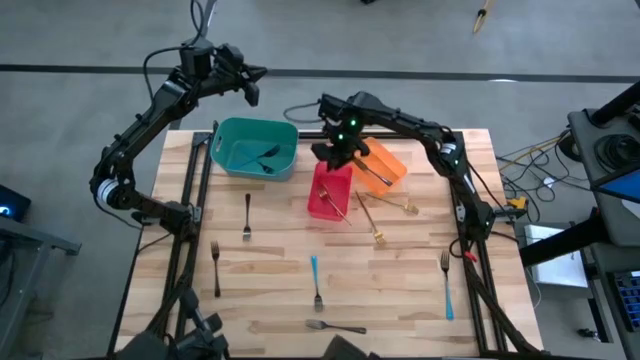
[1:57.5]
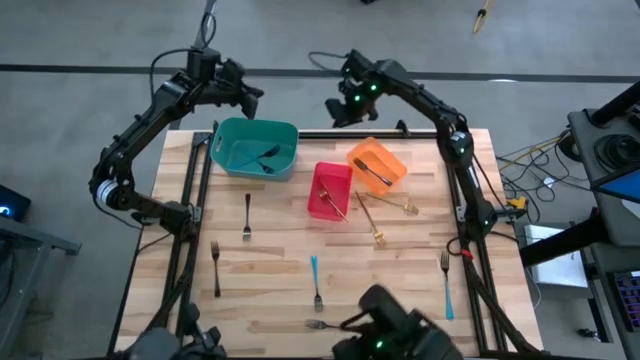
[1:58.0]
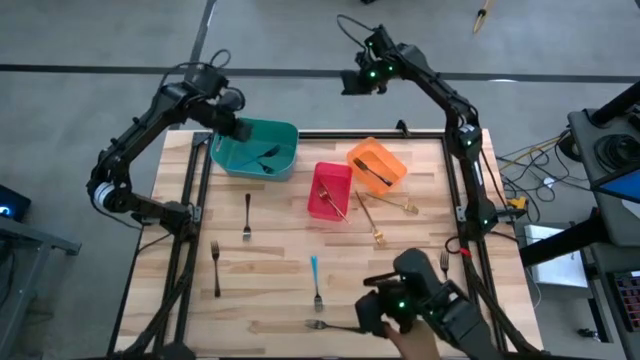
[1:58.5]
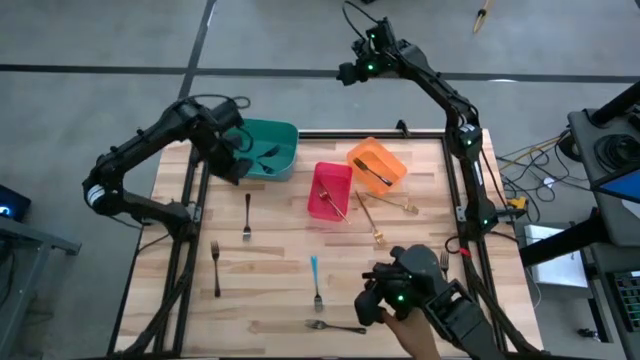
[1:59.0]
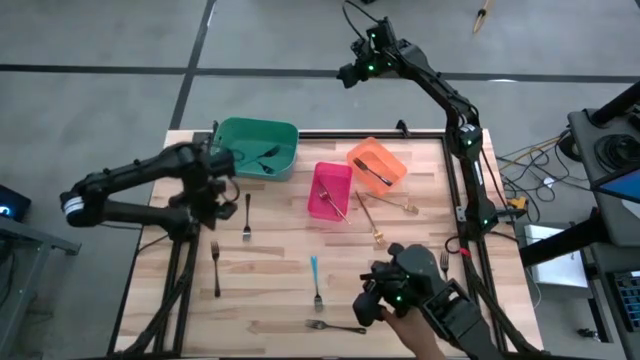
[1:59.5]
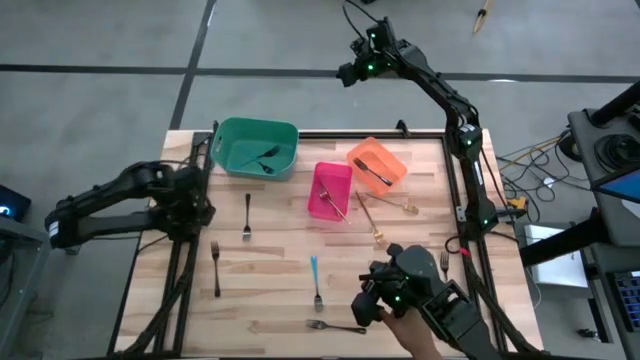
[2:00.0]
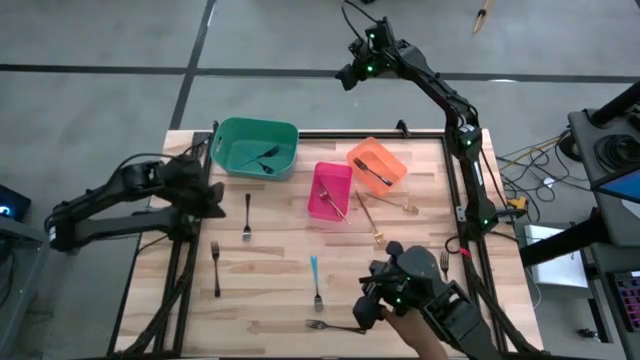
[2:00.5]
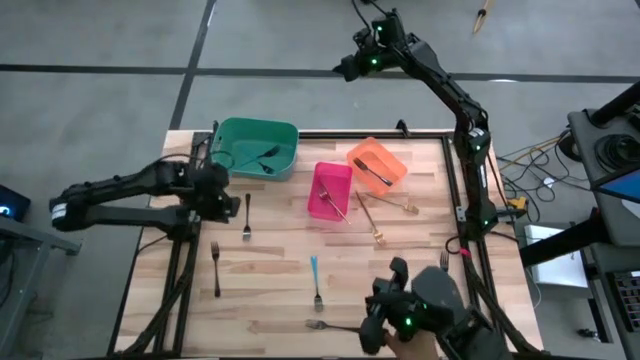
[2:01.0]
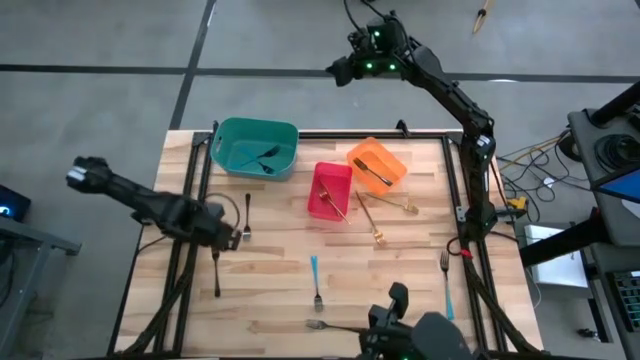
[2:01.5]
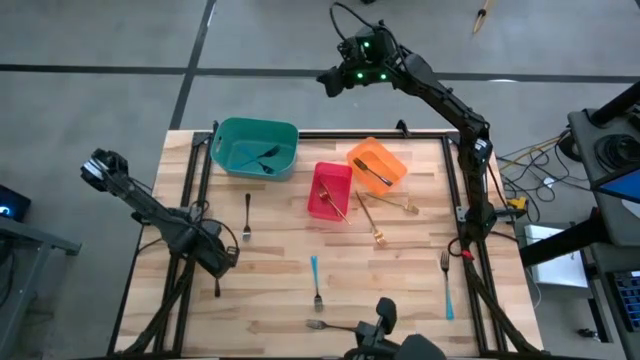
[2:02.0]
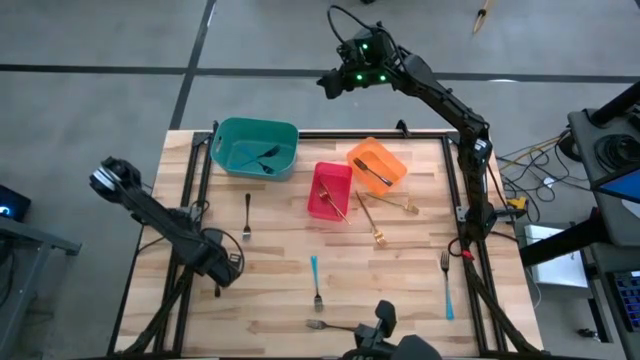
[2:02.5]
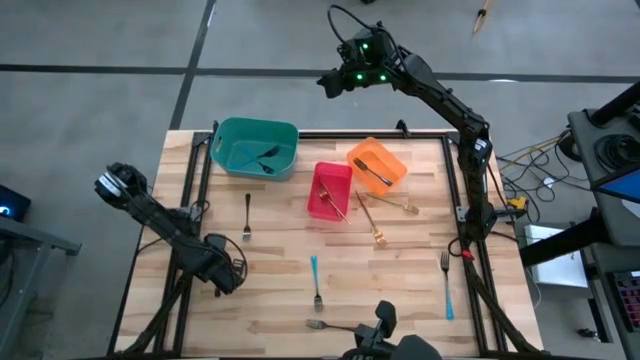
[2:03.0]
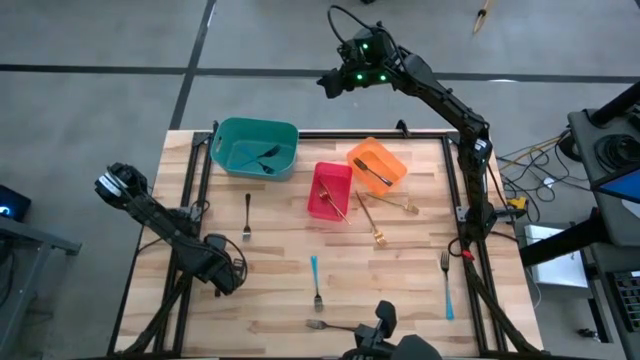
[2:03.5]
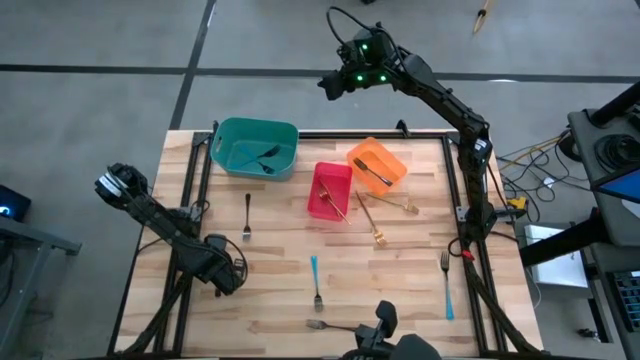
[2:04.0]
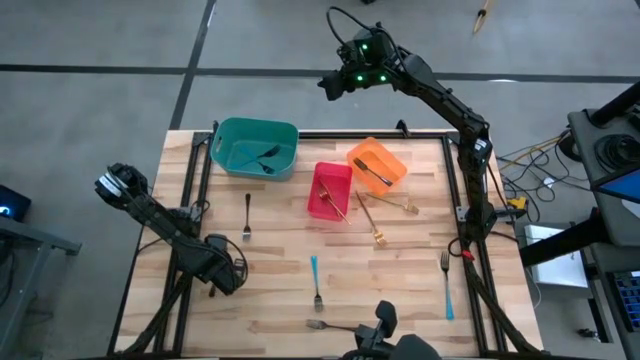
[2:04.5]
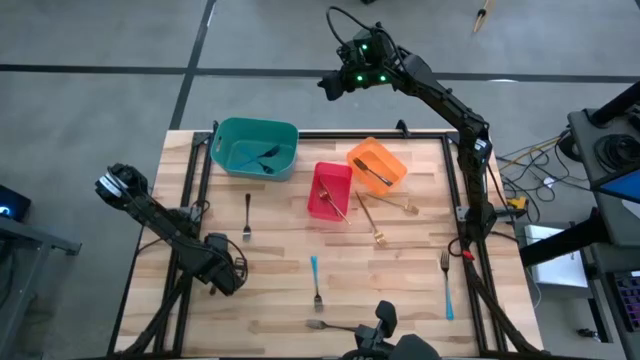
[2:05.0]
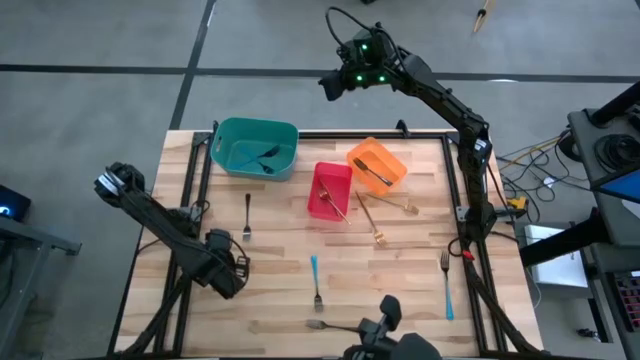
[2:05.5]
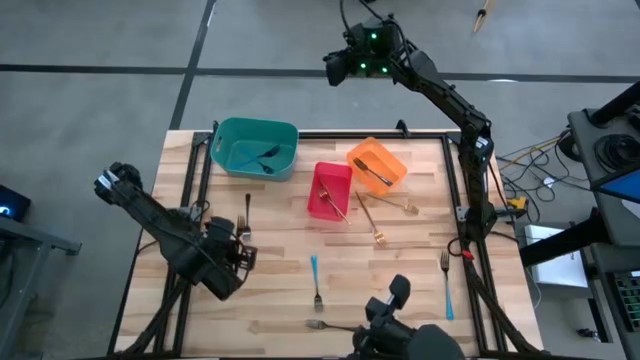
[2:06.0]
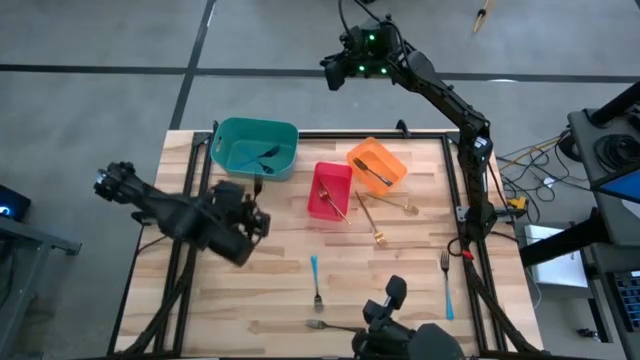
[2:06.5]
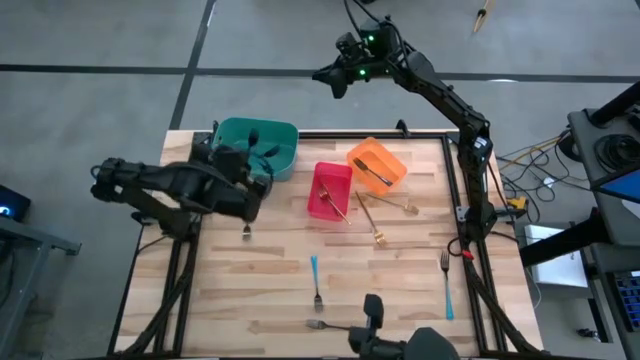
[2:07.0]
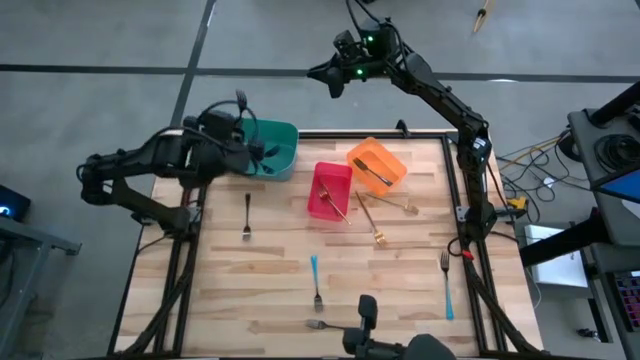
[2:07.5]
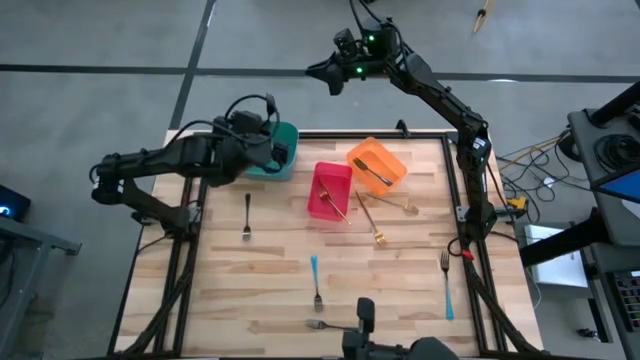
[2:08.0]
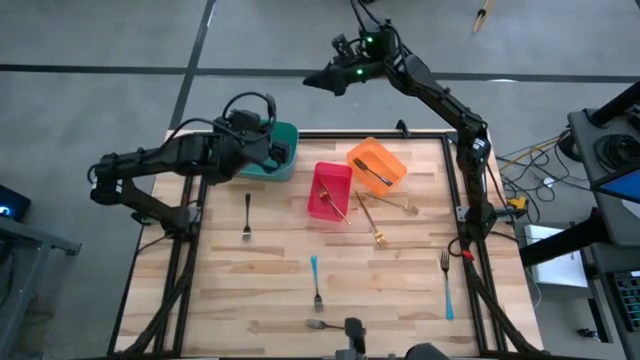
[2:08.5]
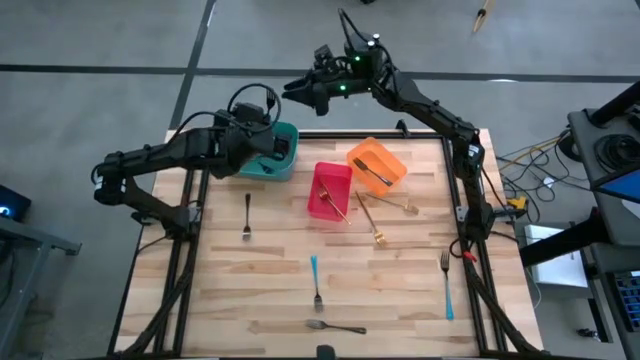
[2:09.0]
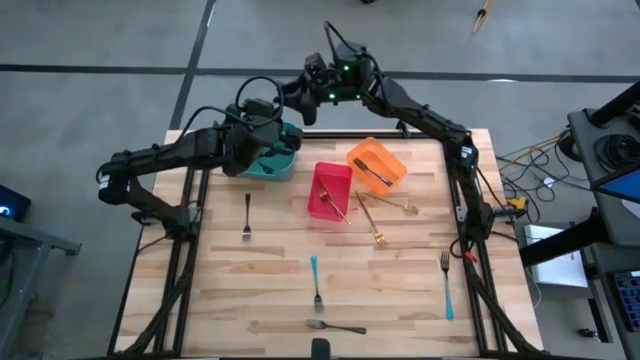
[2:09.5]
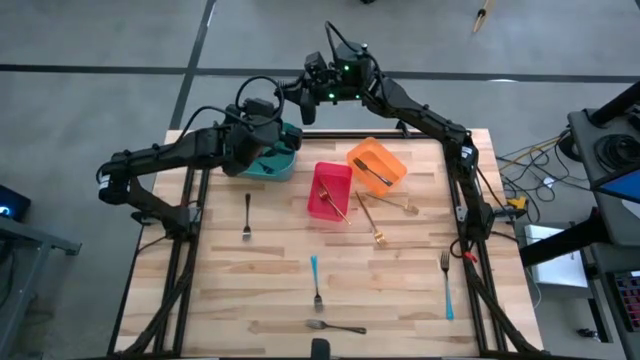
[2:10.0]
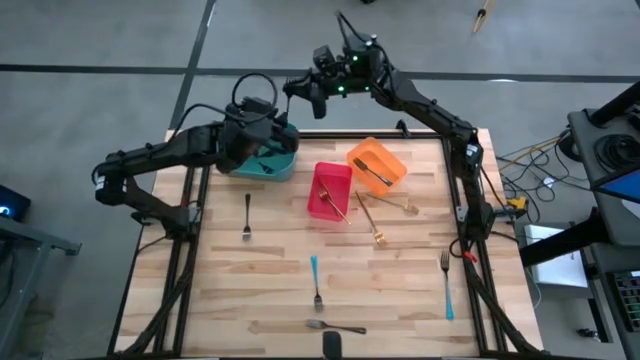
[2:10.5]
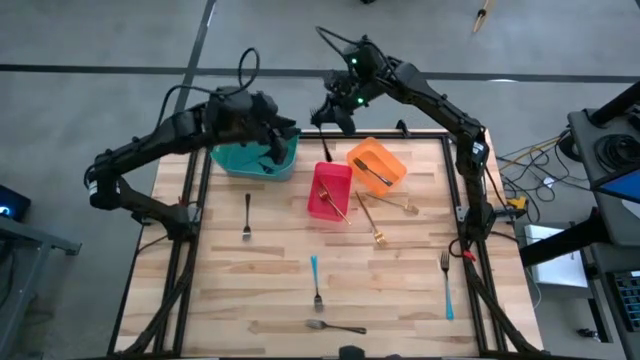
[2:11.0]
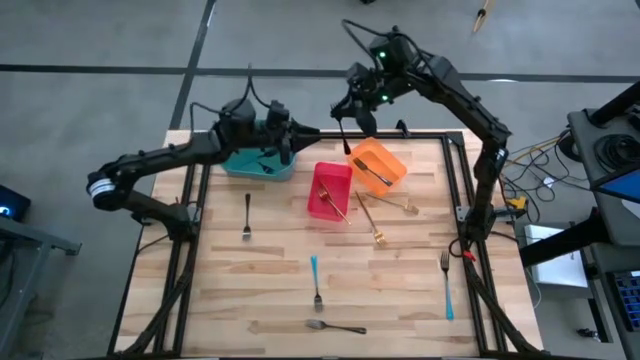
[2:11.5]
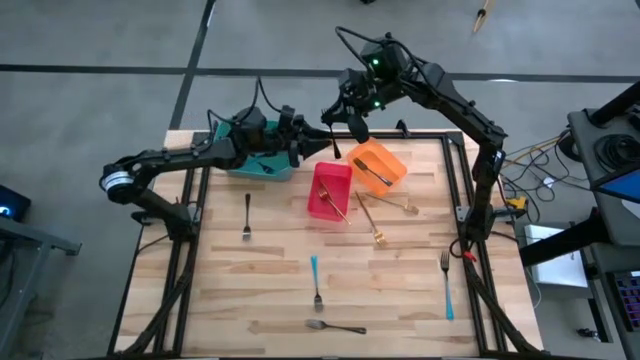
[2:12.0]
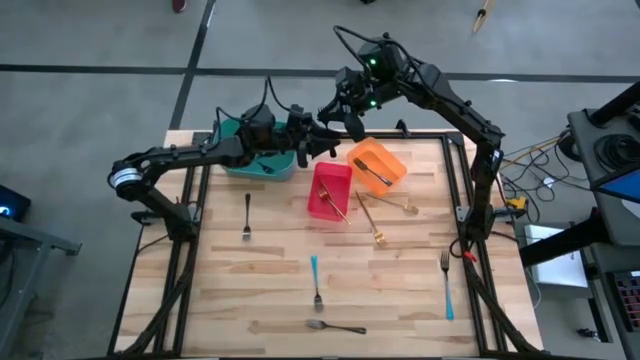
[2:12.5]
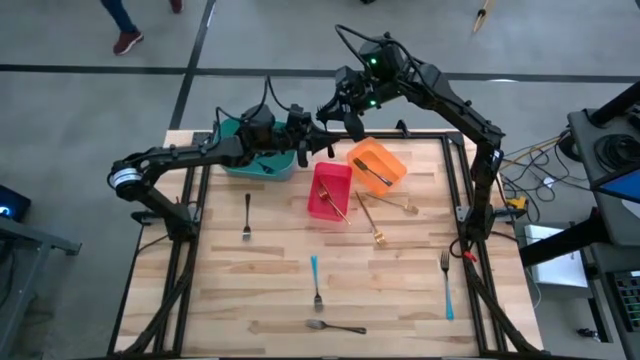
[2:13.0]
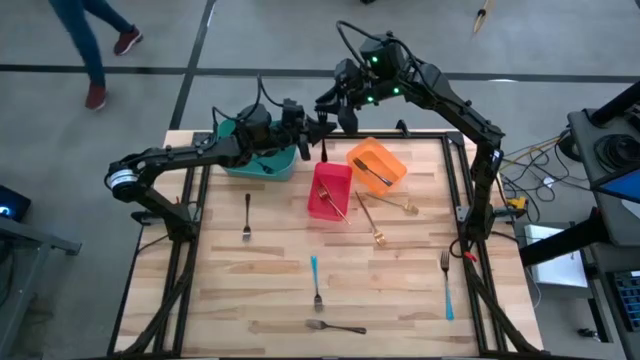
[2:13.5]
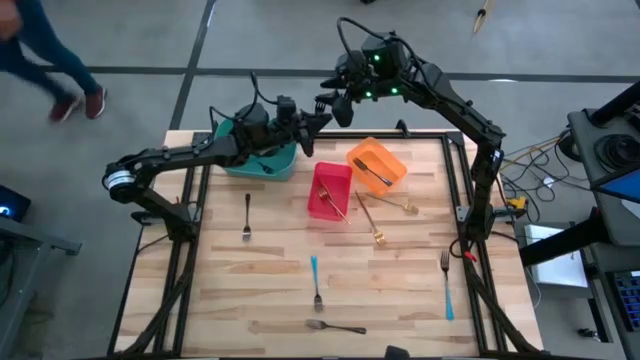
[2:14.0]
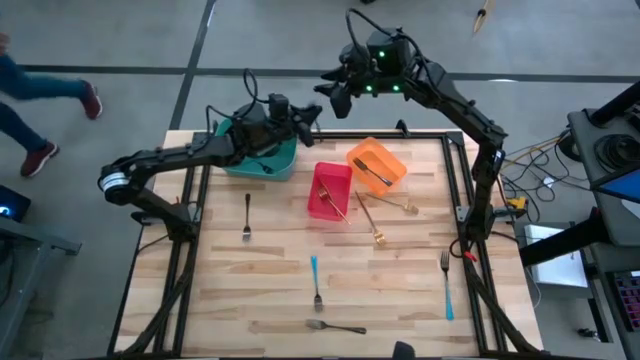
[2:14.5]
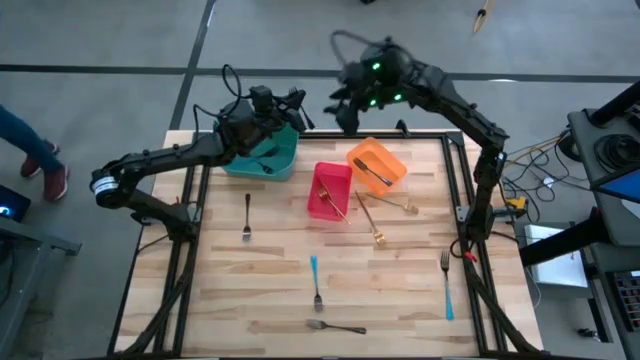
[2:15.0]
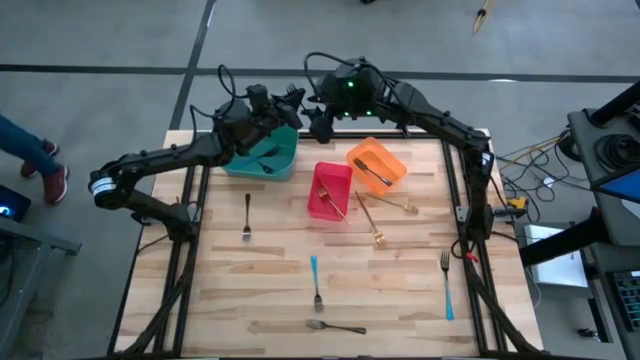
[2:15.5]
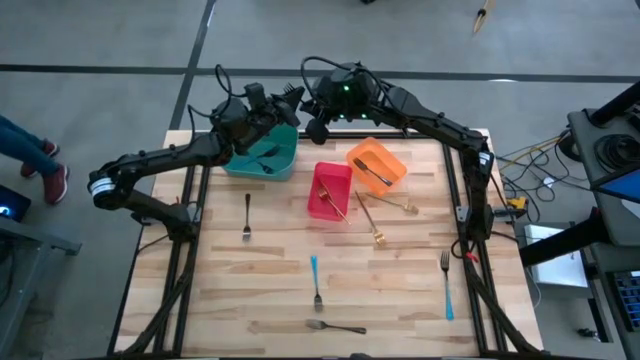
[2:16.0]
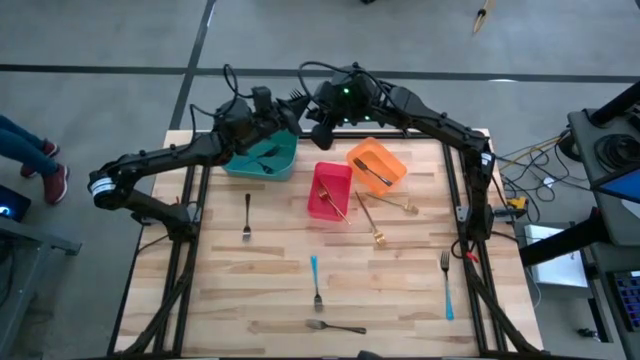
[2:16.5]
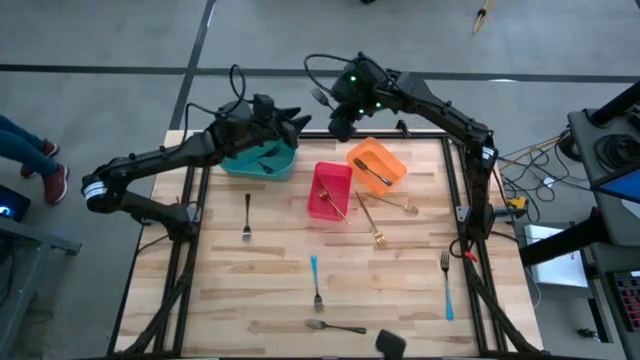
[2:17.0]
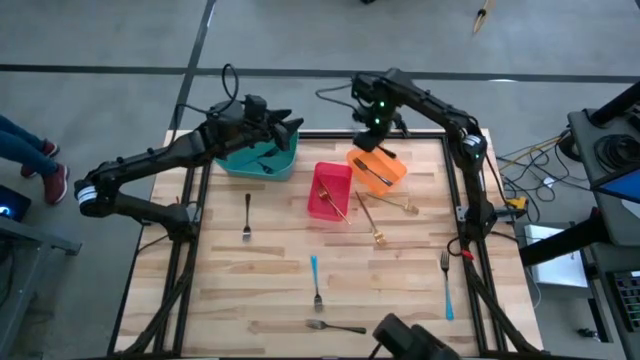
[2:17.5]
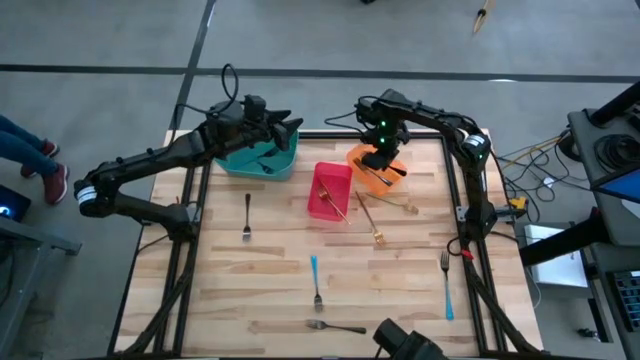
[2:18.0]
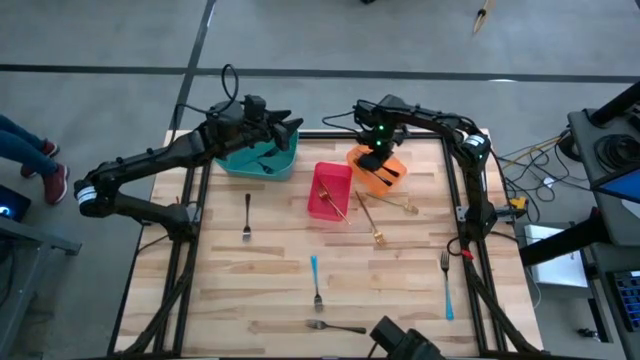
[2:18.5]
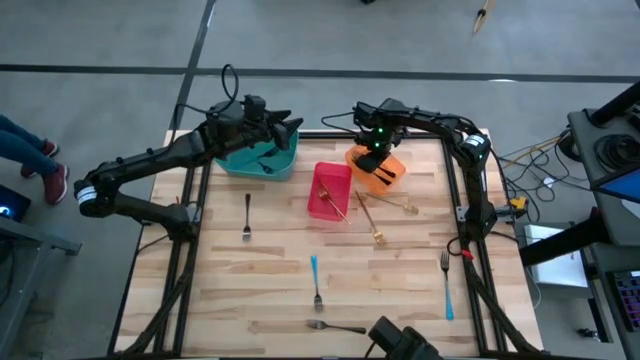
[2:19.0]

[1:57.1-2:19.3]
Task: Sort silverware by color (type)
Put the black fork into the orange bin

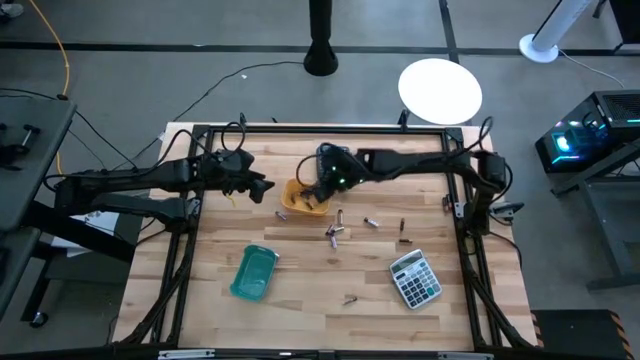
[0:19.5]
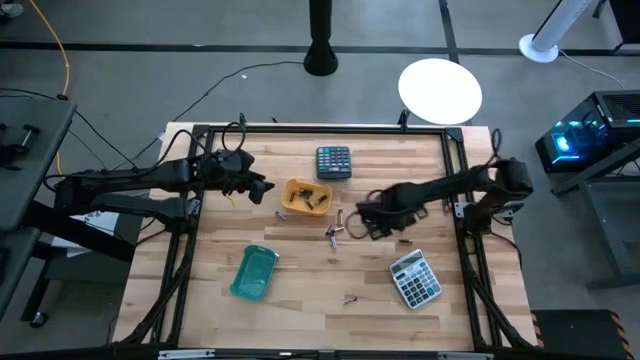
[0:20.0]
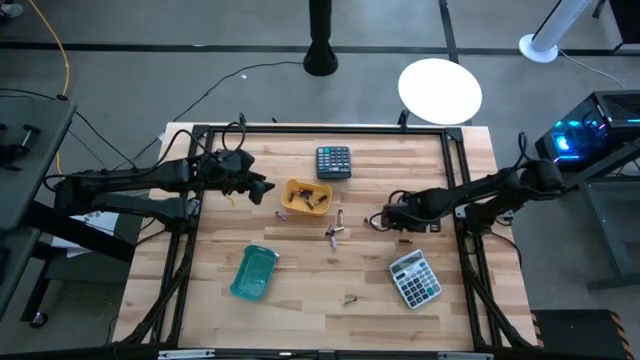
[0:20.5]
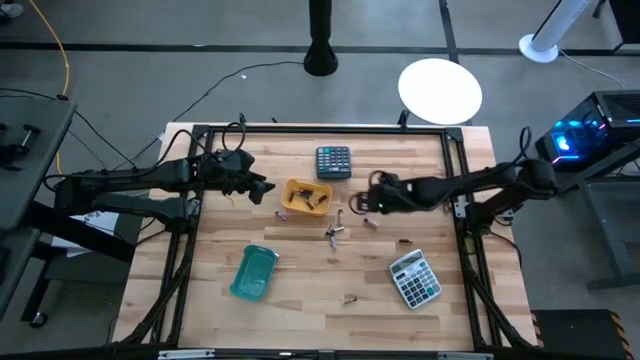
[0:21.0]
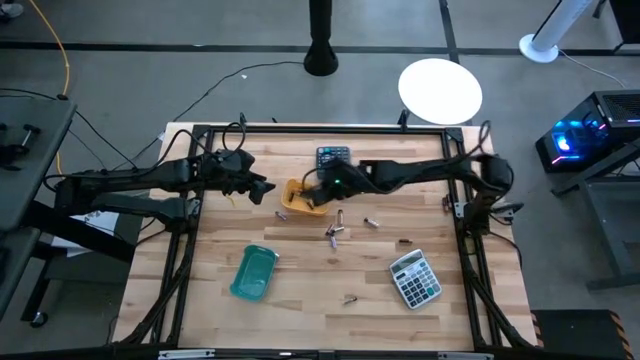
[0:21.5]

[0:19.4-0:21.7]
Task: Sort batteries
Put the black battery into the yellow bin
